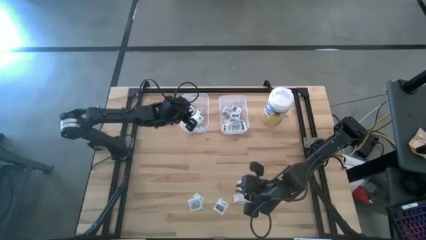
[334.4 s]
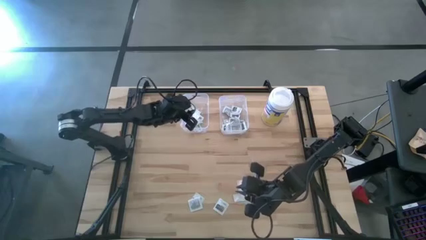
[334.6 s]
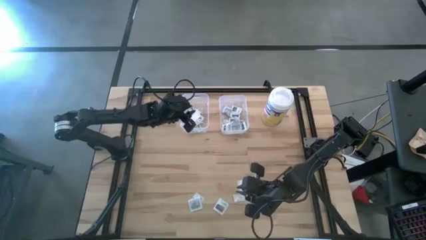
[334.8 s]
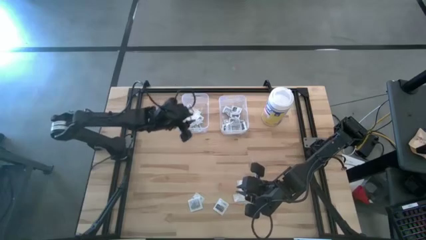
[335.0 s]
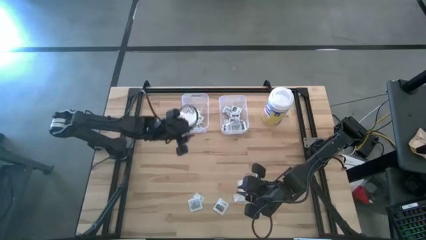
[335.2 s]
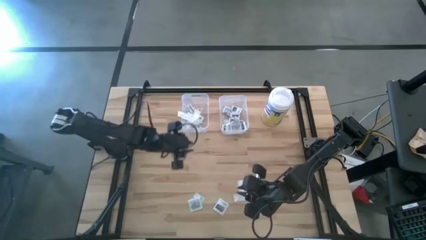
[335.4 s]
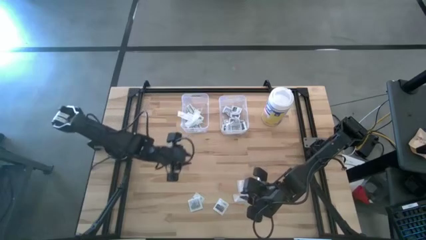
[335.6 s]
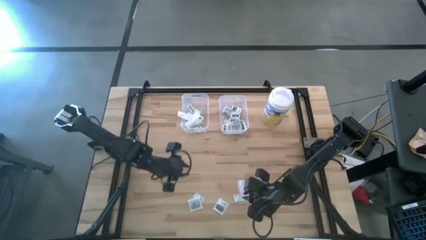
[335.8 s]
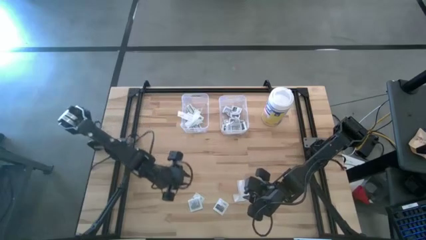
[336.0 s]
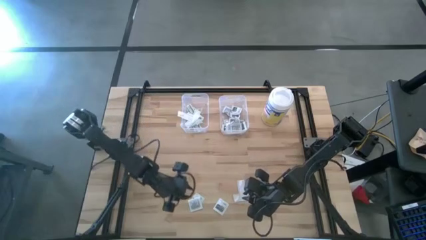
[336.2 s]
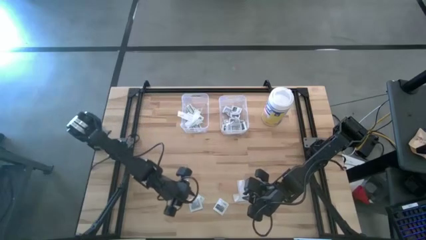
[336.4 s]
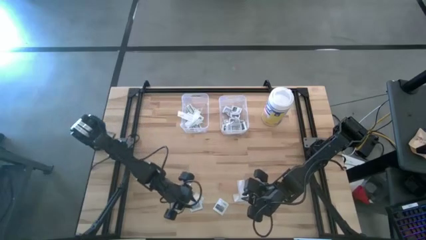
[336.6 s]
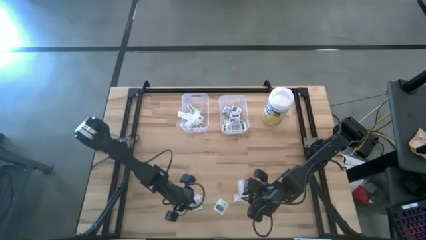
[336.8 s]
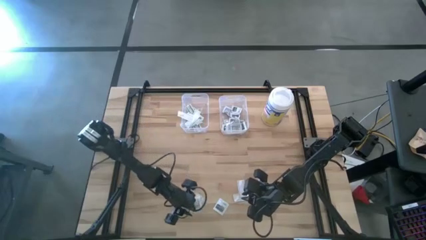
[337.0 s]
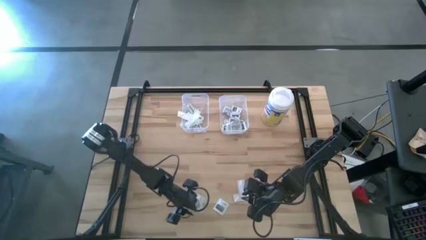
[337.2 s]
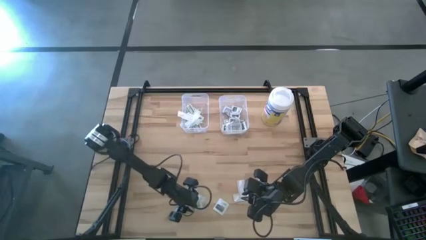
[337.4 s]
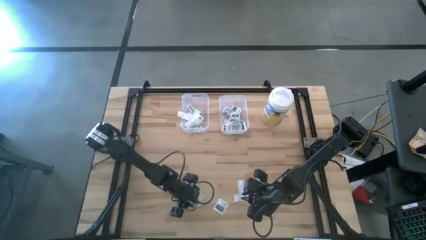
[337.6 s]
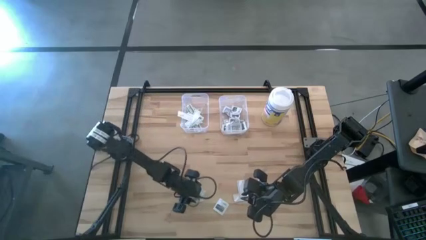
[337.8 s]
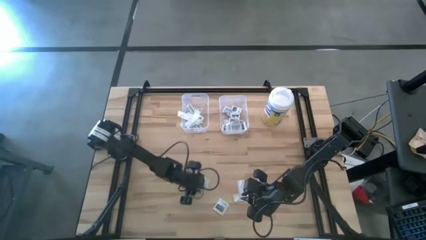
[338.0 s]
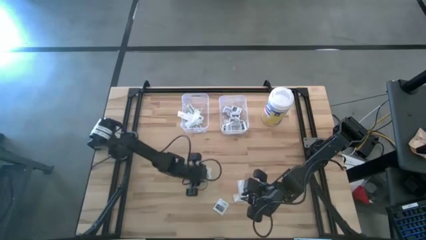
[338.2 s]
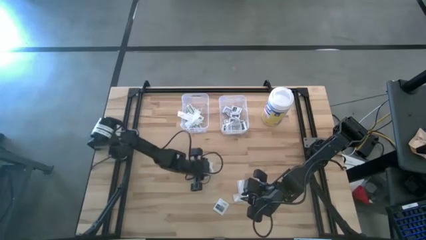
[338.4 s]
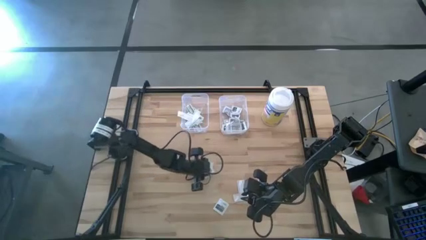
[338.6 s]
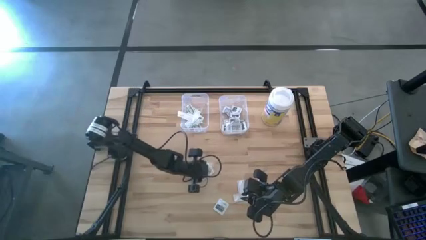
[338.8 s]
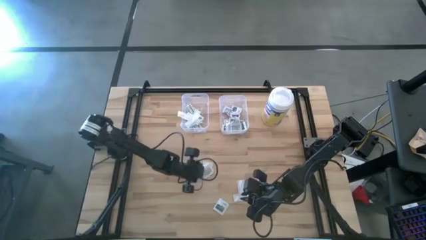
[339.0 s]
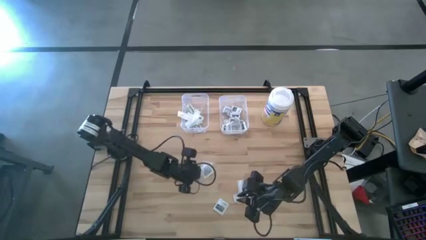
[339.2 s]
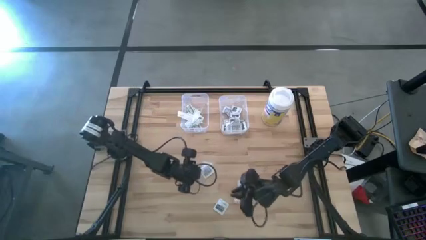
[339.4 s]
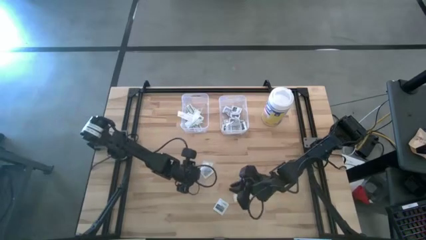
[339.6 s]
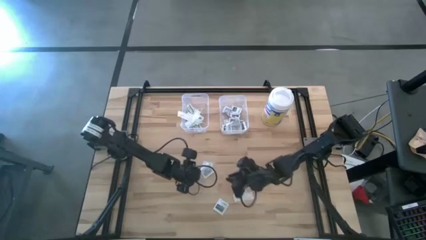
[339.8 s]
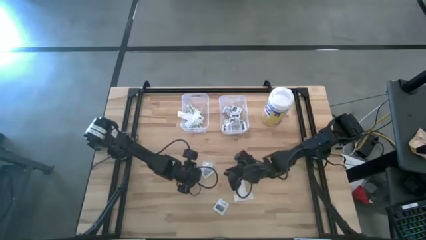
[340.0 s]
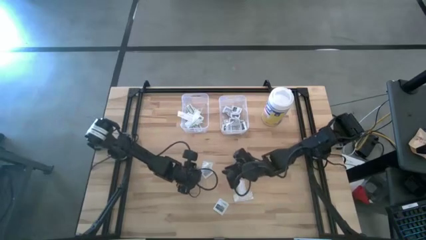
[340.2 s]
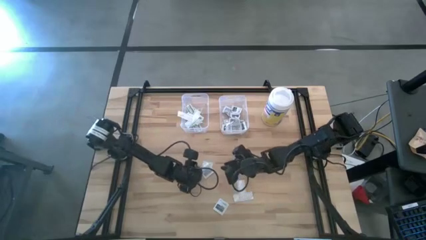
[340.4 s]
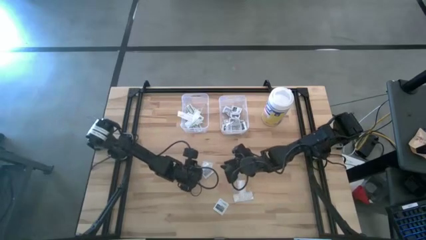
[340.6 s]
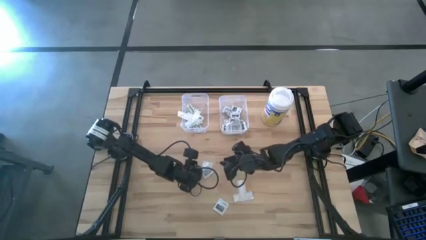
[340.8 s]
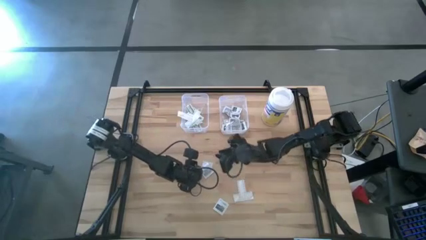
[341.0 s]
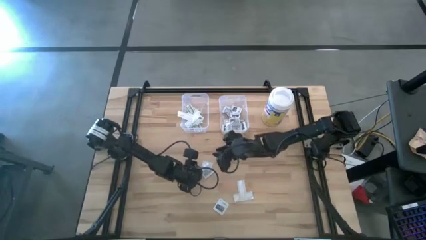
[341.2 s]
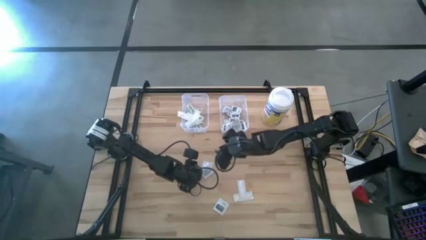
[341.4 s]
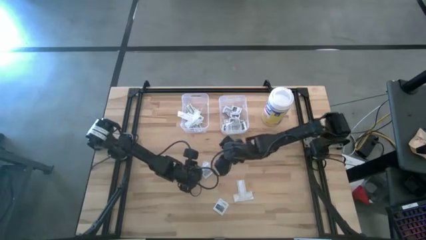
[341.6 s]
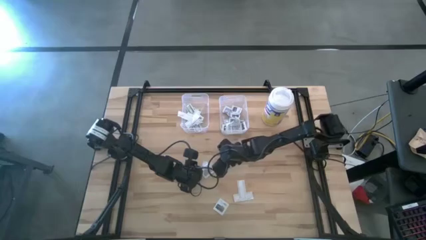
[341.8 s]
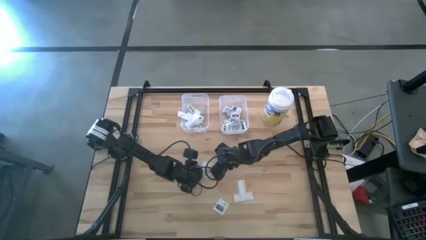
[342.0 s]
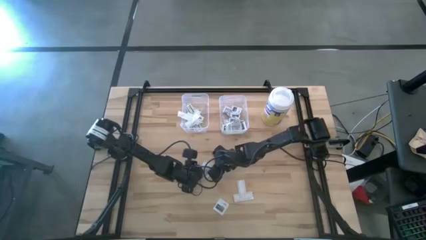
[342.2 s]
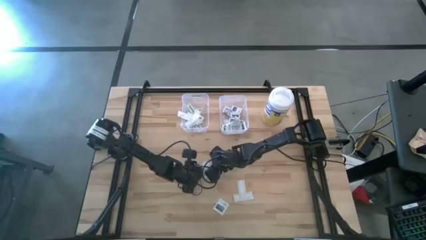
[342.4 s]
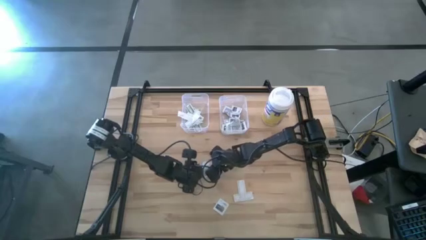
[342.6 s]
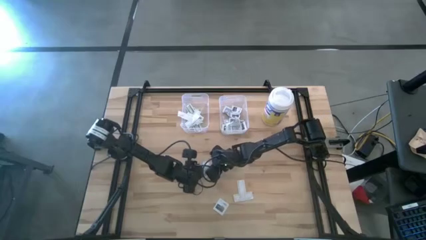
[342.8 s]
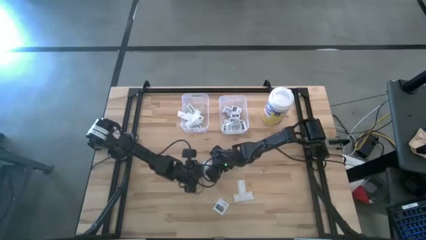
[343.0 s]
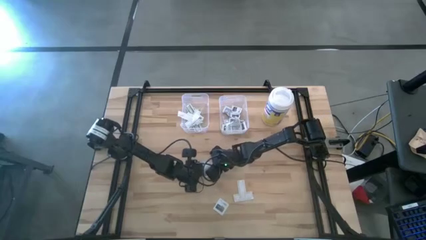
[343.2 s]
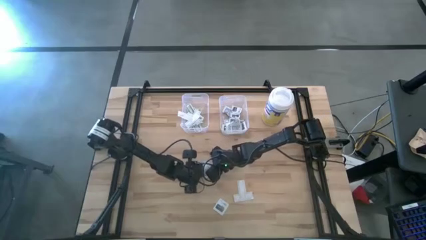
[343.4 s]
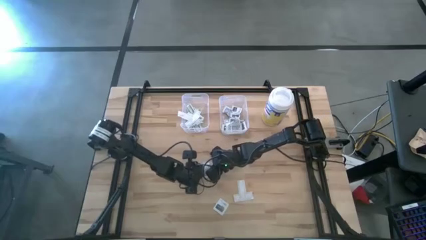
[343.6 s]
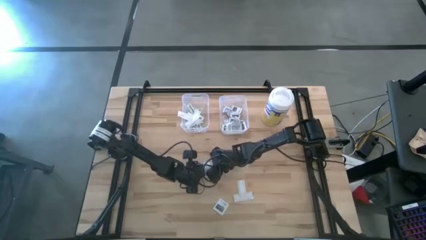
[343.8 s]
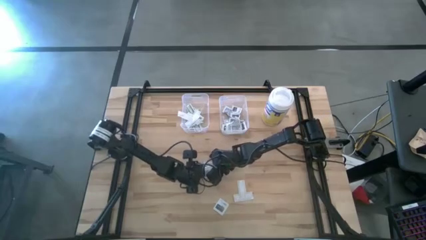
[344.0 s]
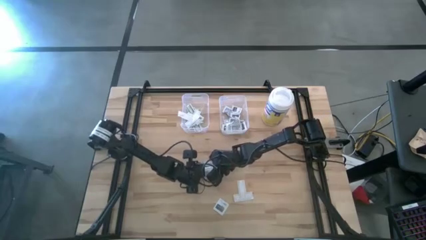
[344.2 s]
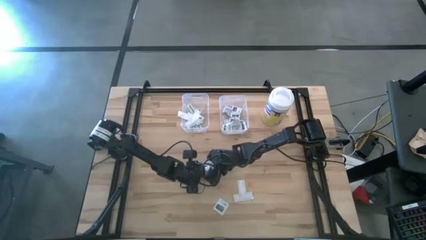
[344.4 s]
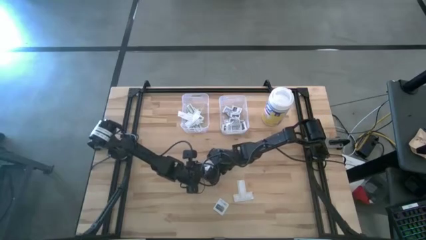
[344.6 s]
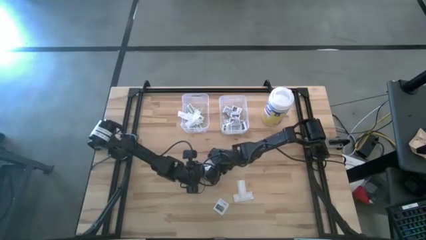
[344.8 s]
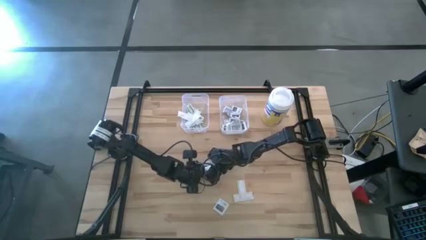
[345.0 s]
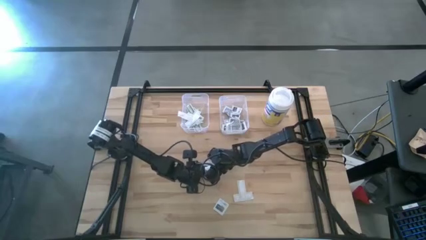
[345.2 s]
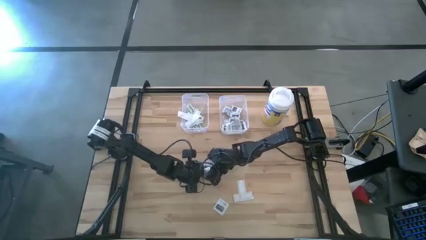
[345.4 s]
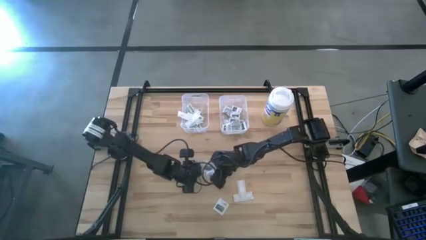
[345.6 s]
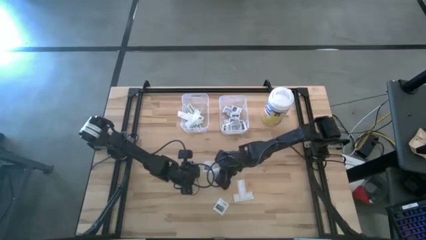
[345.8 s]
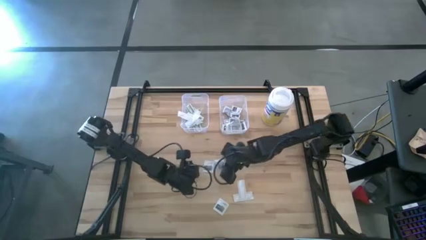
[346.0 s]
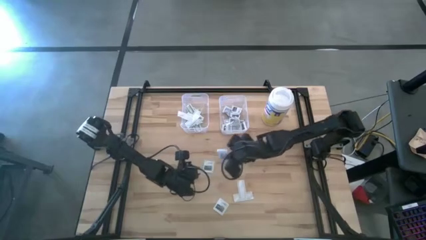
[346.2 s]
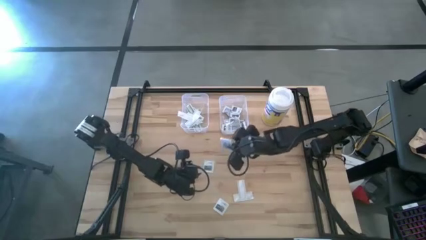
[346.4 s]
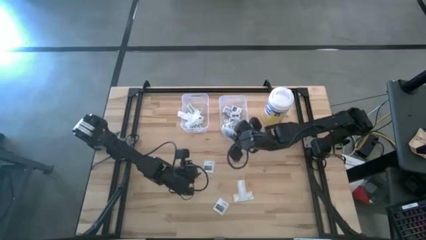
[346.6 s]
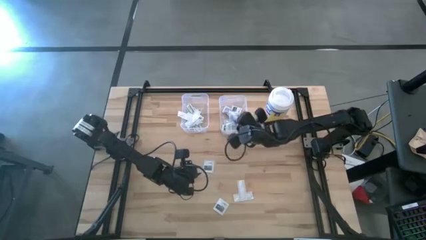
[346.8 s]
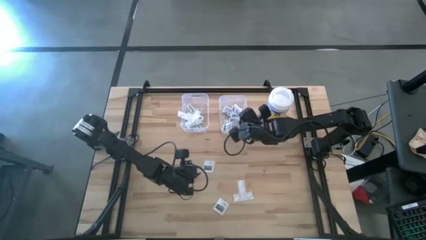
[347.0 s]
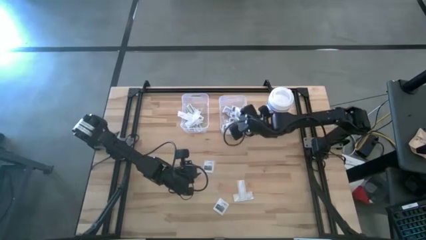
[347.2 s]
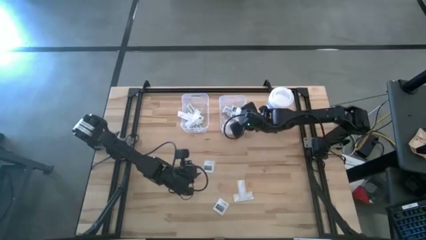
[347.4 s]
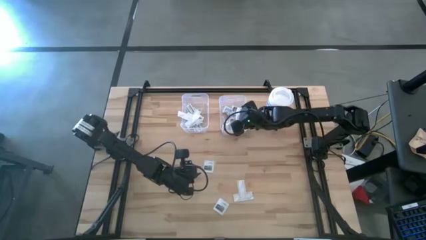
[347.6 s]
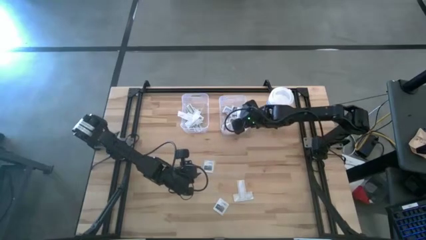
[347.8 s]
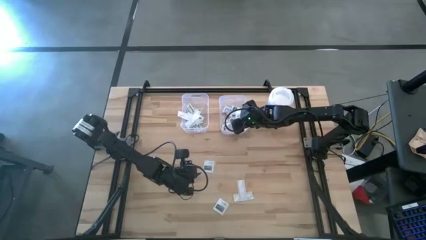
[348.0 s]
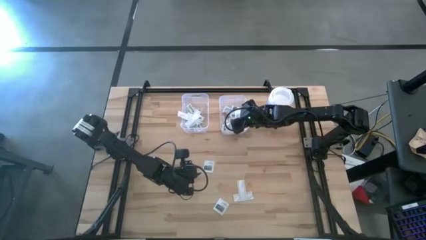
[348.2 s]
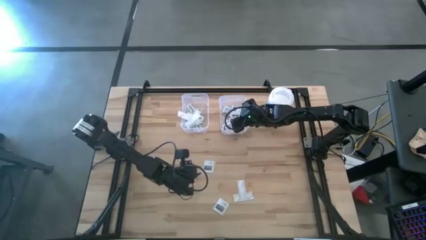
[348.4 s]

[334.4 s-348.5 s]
Task: Pick & Place First Aid Supplies
Put the gray towelette pack into the right transparent bin
